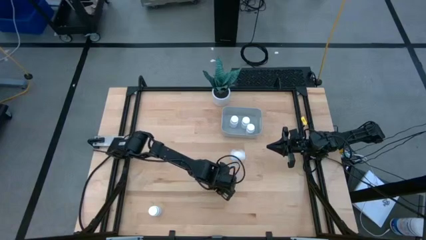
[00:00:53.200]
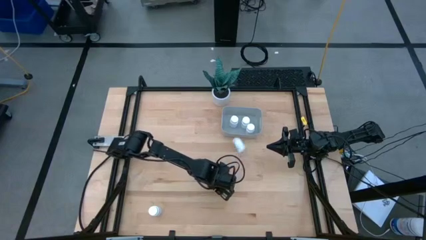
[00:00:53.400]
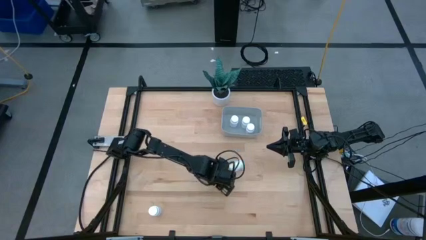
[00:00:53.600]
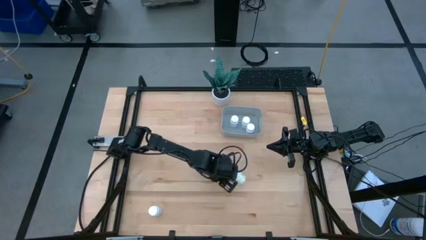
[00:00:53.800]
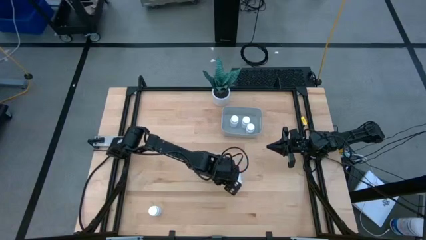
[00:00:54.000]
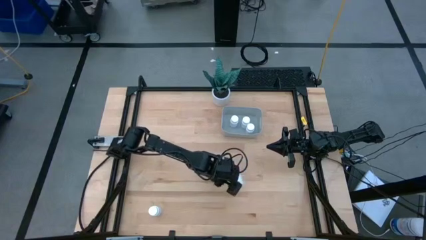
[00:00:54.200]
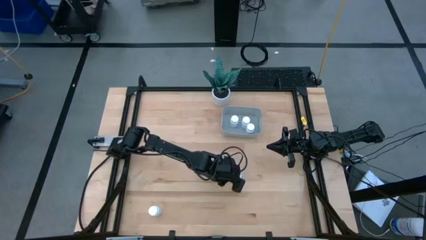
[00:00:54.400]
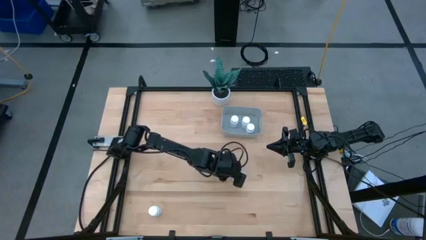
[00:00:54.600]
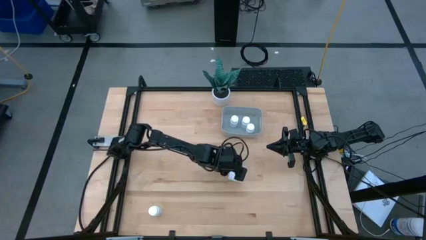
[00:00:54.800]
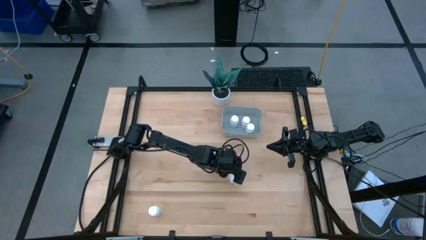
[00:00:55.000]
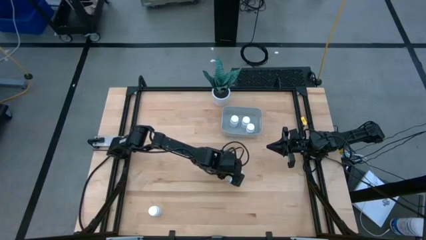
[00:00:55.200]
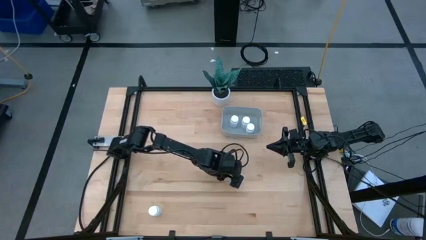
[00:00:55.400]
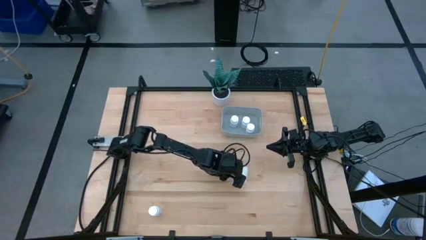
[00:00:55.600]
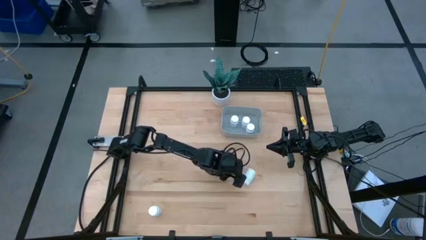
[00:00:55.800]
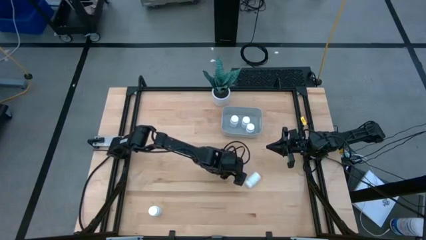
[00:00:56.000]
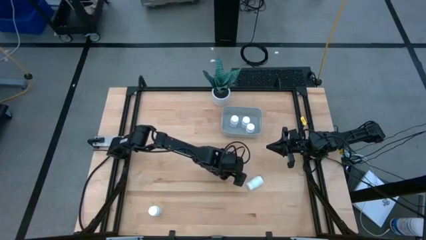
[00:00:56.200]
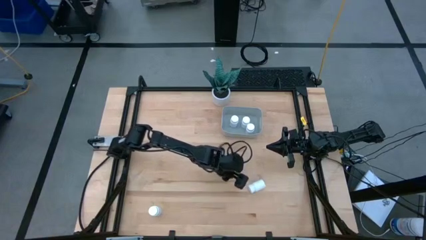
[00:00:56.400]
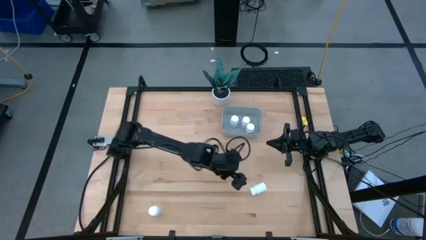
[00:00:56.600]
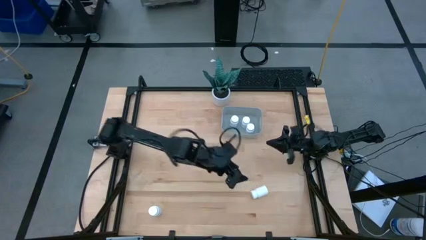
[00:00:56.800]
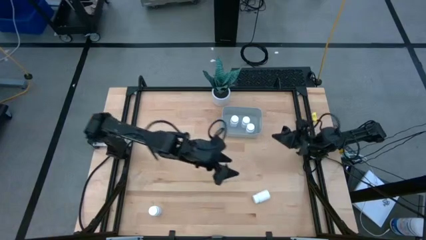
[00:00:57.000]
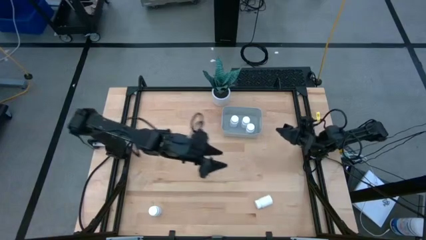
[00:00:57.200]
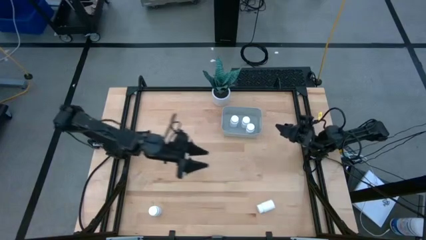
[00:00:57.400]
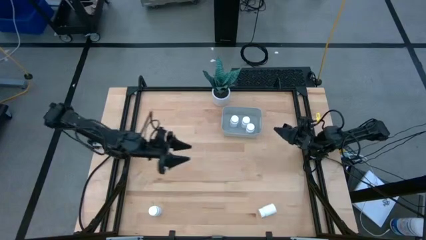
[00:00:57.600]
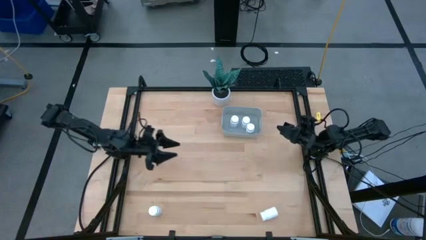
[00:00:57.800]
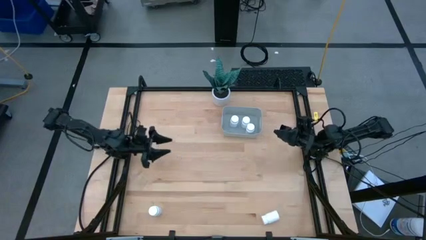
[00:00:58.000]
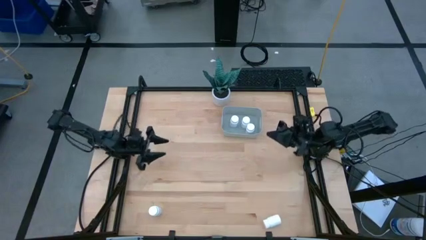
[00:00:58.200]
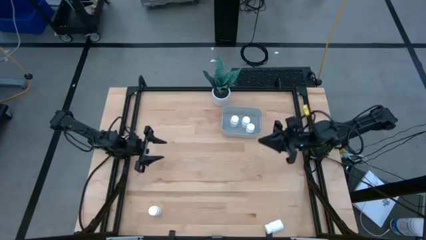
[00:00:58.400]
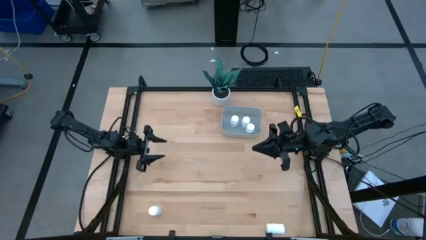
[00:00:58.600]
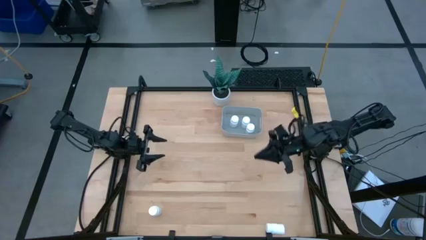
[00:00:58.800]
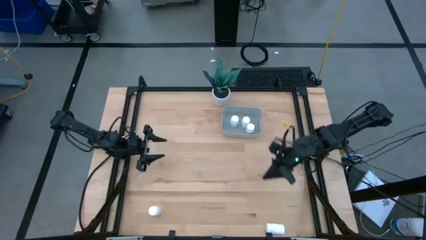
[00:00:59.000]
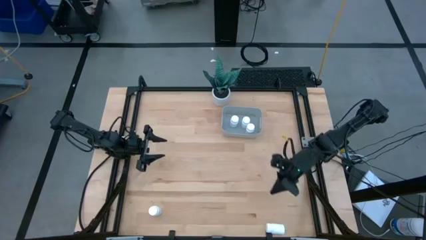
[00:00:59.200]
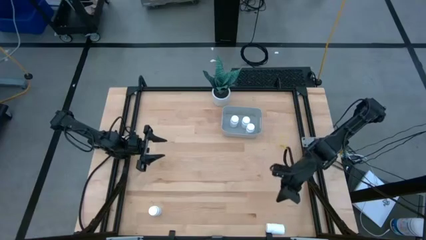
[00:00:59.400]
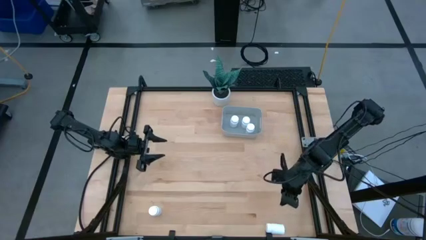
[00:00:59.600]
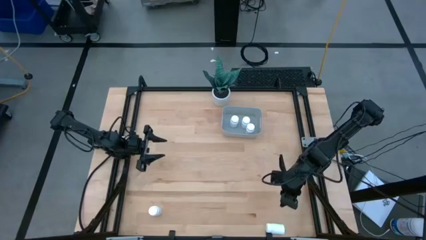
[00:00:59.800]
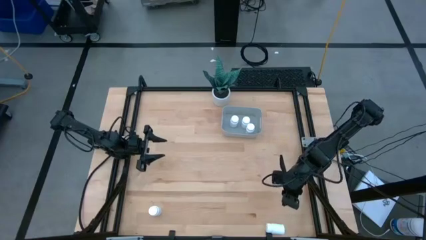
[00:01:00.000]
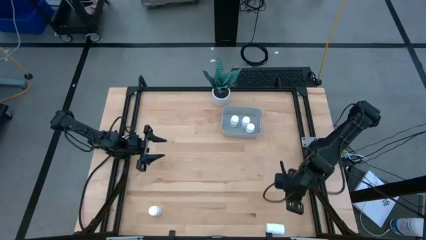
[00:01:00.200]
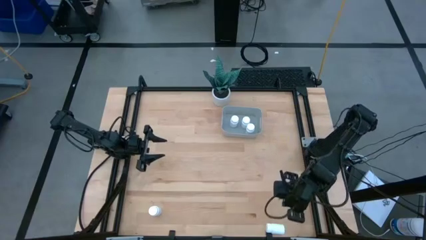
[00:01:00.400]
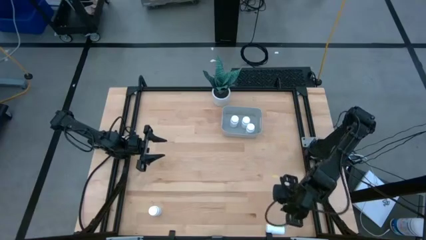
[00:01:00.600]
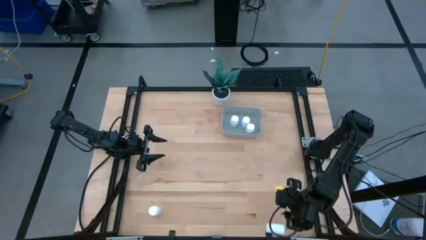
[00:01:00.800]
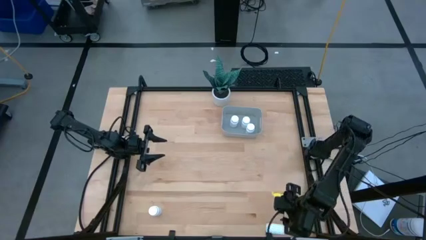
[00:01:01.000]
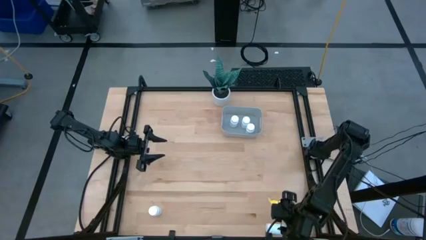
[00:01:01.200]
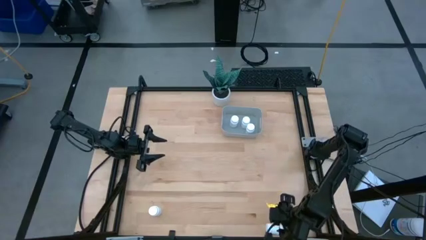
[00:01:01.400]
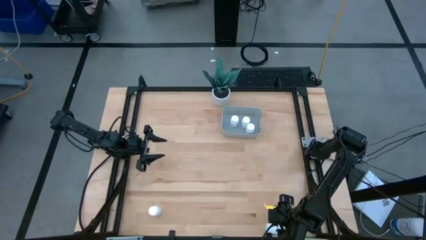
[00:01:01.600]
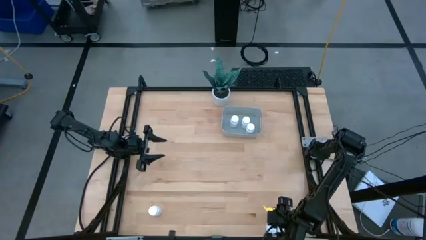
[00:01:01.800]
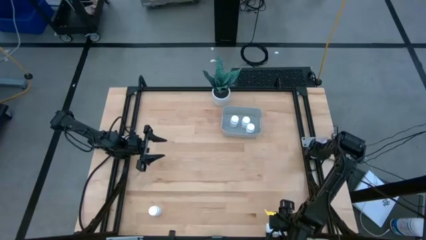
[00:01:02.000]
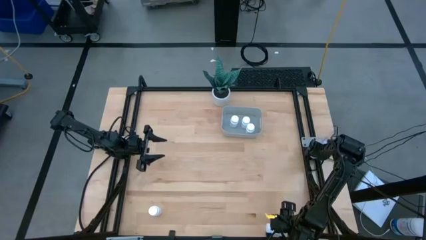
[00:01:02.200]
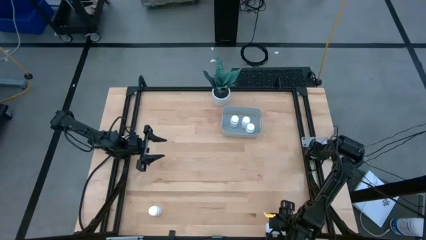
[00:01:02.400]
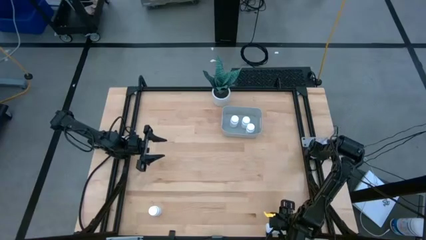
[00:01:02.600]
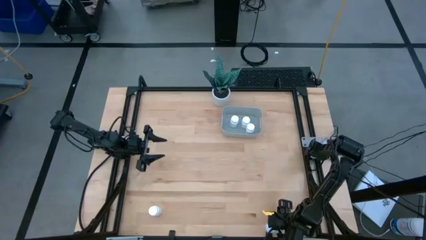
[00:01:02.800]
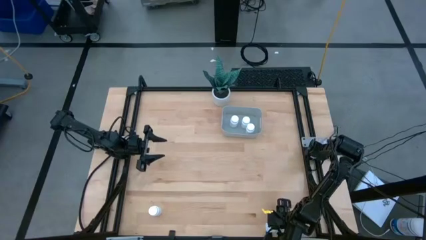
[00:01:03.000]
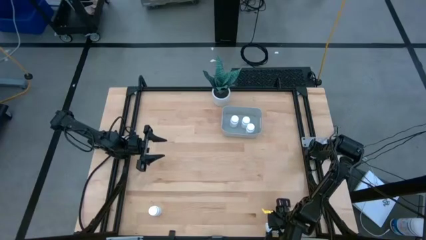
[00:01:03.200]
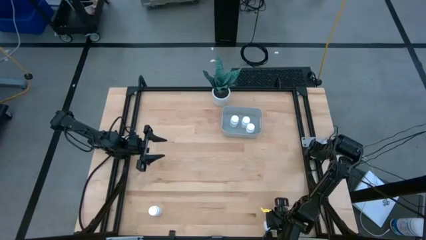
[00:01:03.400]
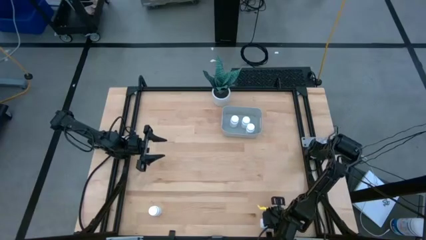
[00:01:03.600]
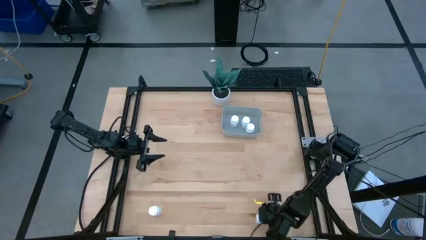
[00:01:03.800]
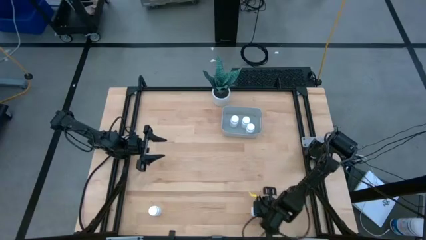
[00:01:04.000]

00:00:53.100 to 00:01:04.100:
Task: Pick and place pill bottles into a basket
Put the white pill bottle into the gray bin

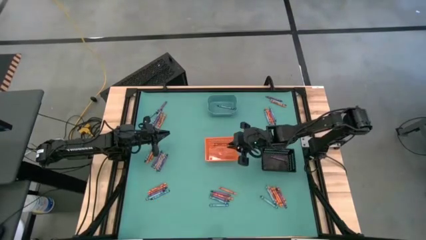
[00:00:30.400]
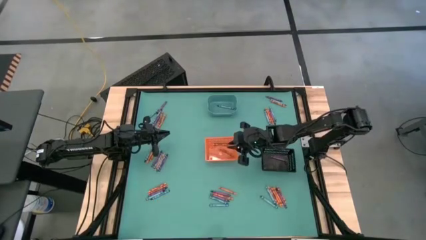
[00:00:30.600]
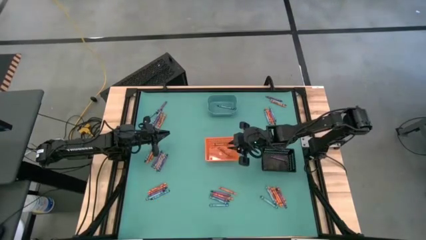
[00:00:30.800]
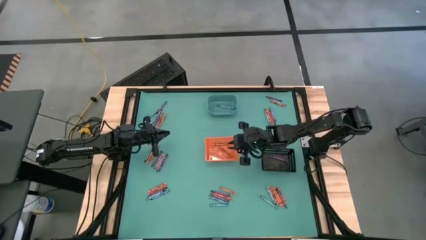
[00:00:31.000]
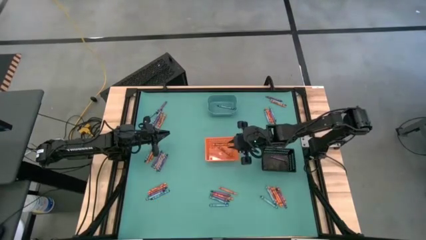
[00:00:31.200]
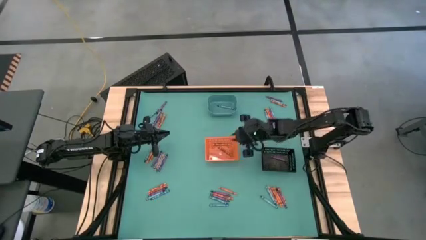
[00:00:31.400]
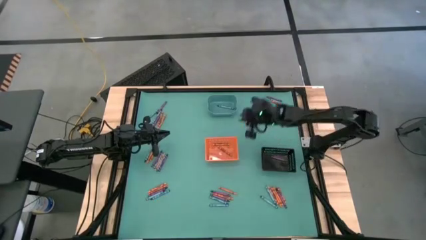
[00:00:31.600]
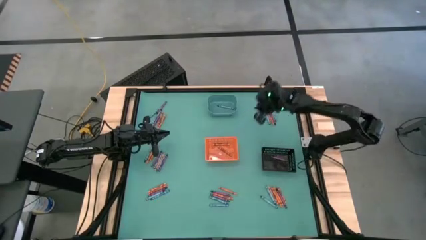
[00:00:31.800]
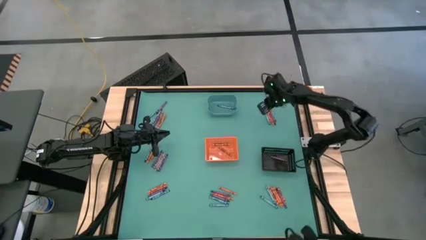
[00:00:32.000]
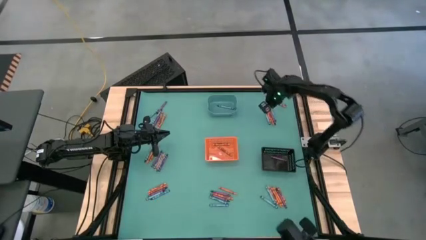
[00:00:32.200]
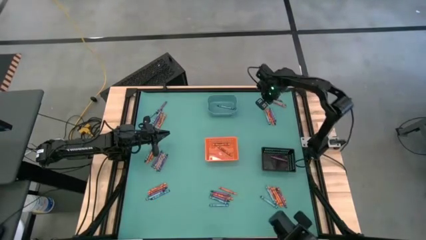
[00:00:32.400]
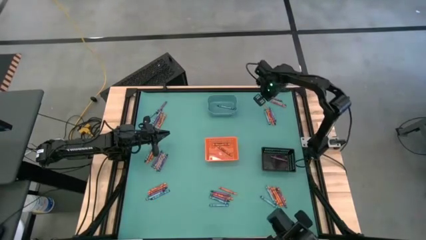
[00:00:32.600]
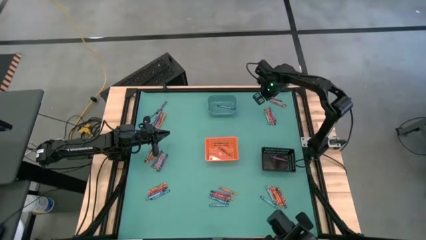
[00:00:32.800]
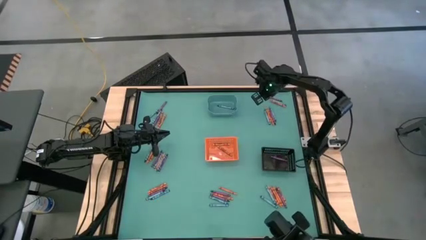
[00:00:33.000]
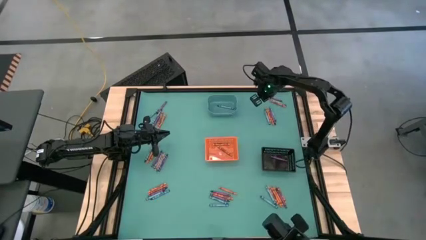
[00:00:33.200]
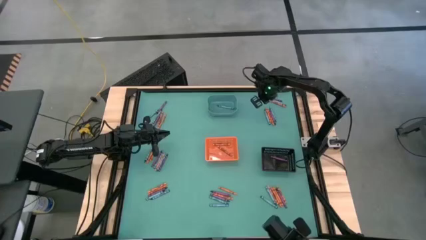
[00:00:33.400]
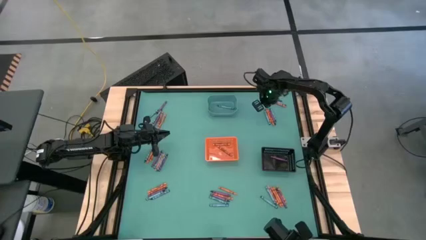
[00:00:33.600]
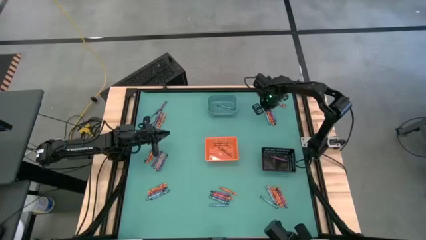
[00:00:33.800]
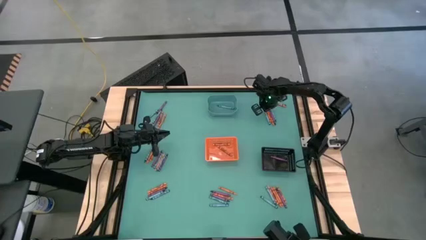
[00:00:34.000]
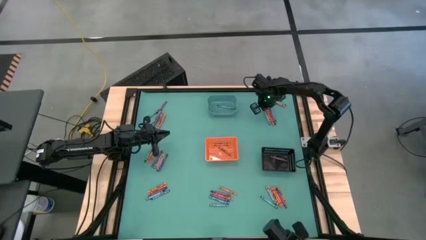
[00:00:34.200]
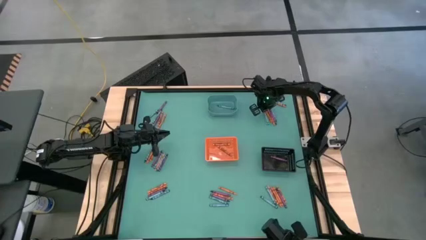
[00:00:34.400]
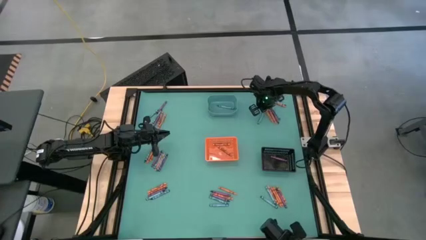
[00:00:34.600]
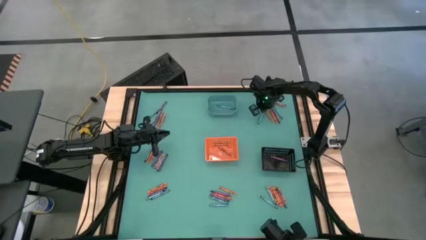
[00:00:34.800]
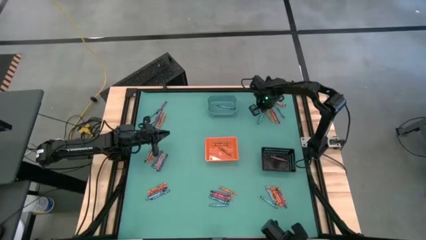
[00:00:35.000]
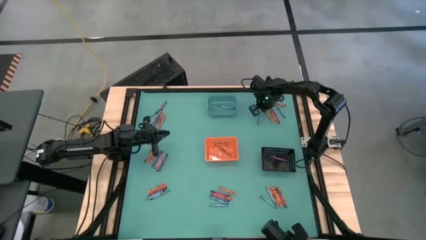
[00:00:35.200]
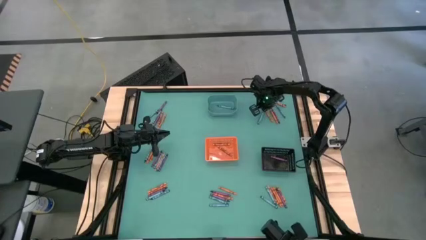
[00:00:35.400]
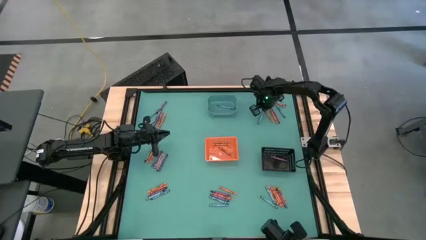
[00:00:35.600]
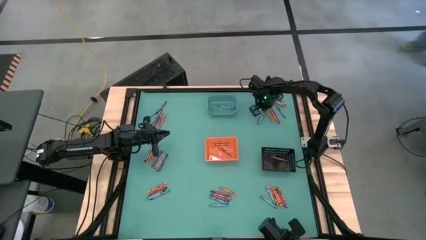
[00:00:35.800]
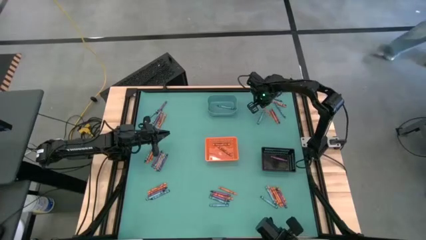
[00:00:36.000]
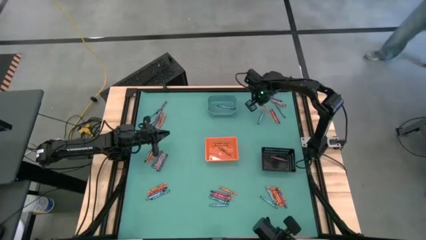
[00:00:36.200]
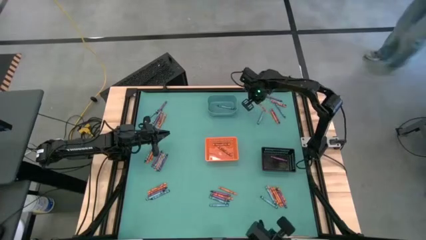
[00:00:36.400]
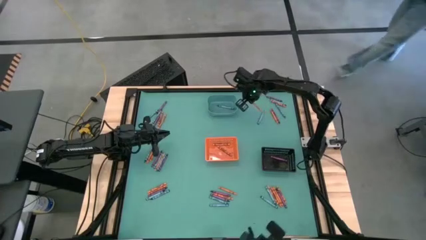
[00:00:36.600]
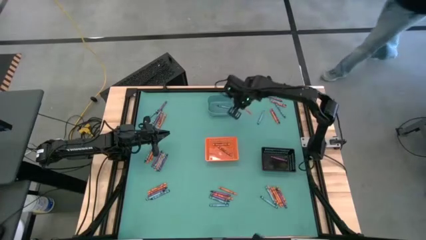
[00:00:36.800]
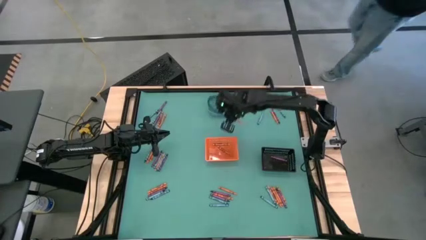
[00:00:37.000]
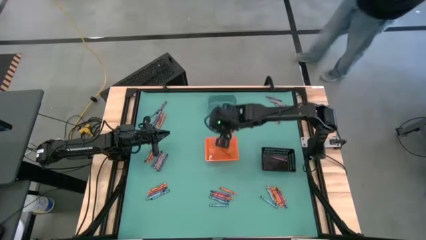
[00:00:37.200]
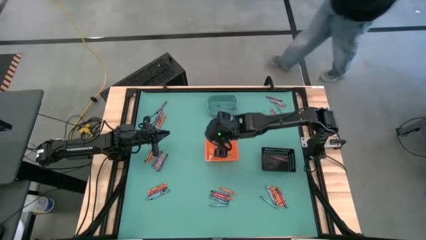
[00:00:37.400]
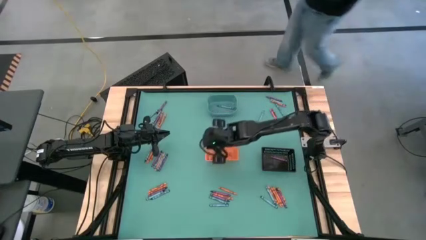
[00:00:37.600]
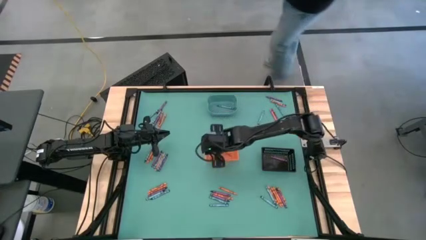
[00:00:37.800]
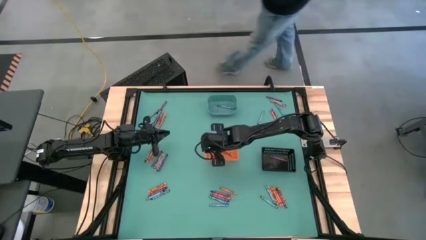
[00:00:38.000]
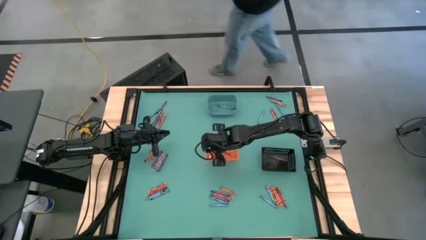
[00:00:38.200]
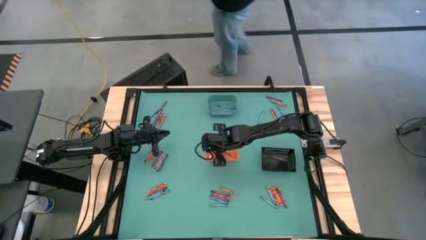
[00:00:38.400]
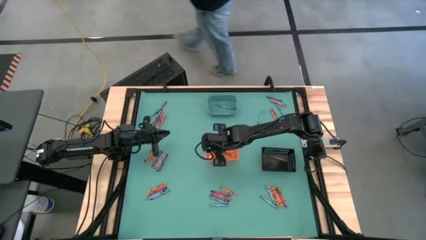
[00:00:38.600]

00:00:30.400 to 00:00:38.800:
Task: Sort crayons
Put the orange crayon into the orange bin
